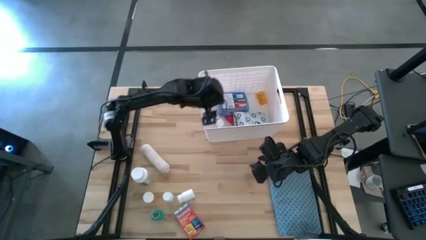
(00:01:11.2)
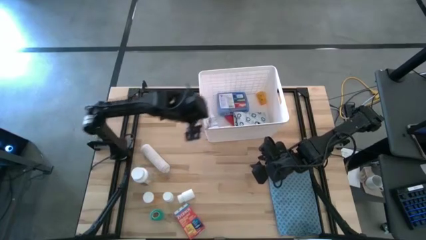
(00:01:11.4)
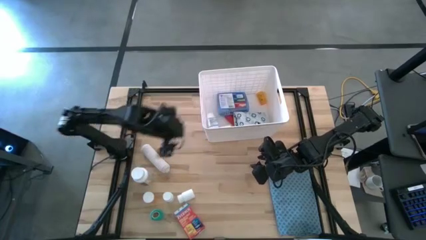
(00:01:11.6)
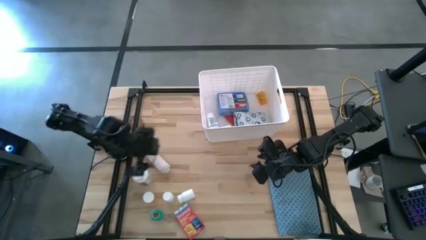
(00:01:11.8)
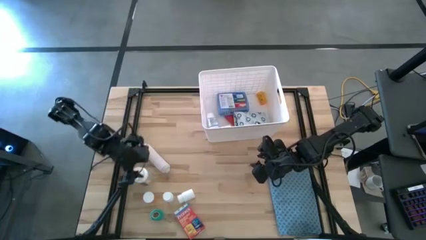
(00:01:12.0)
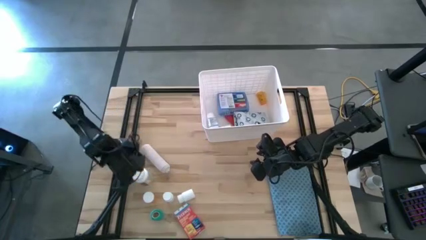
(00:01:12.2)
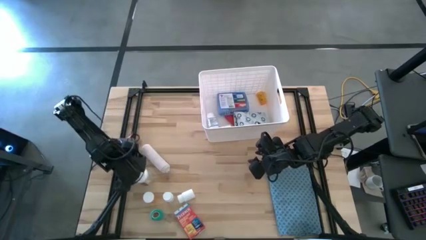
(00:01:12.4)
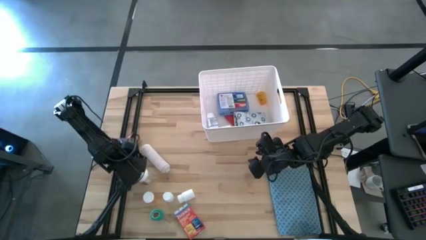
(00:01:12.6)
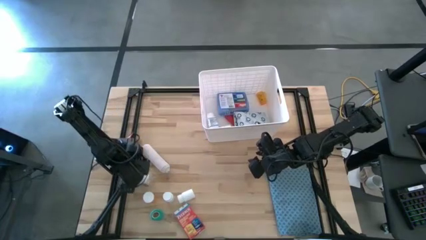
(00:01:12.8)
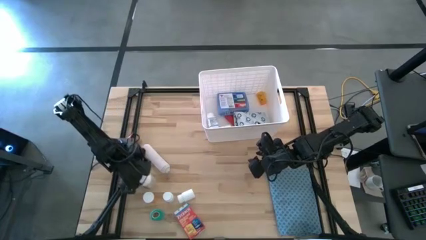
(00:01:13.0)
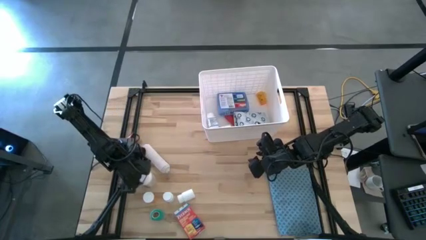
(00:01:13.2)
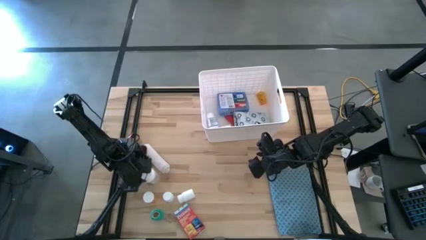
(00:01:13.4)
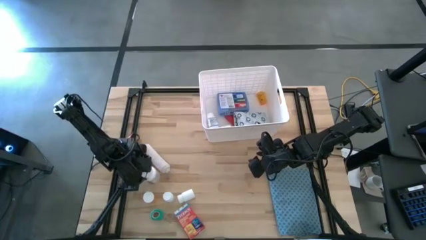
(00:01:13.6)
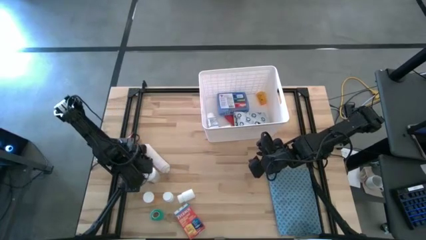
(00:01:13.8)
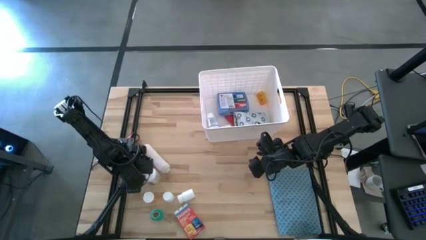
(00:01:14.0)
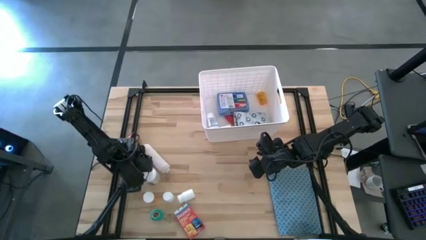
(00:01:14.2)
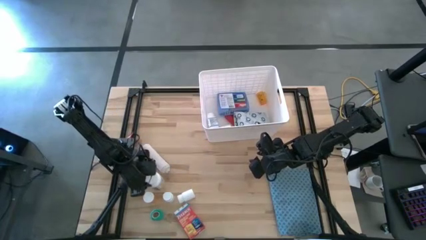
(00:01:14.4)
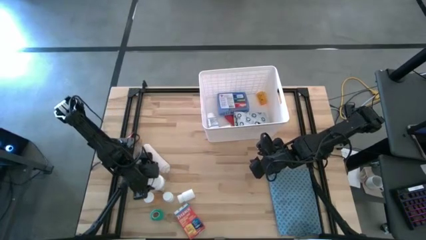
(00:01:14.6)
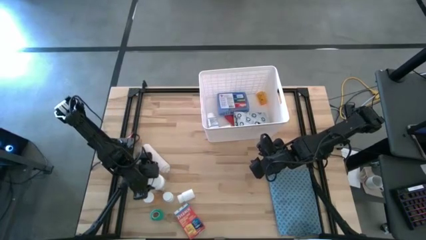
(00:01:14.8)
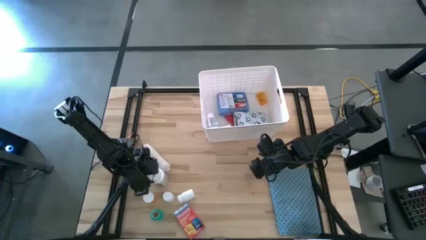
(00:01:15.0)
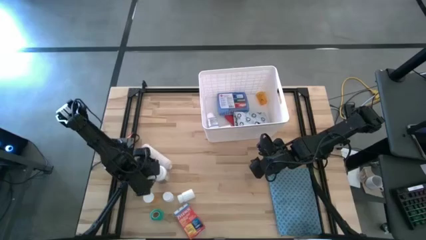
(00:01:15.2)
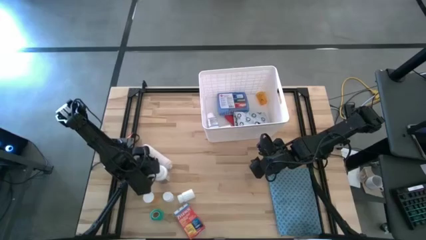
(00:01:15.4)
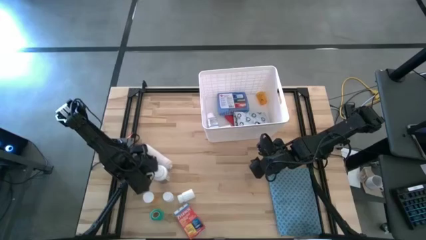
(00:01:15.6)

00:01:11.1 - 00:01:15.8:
Task: Pick & place medical supplies in basket/bin
Put the purple and white medicine bottle into the white bin

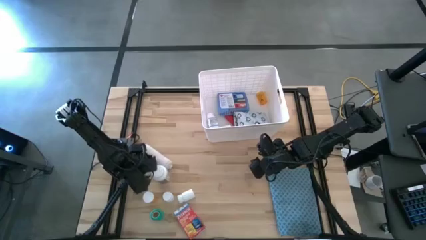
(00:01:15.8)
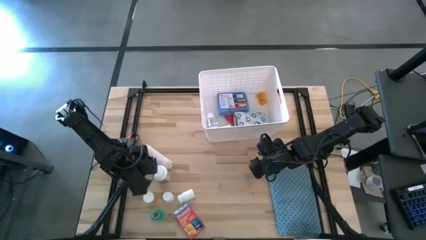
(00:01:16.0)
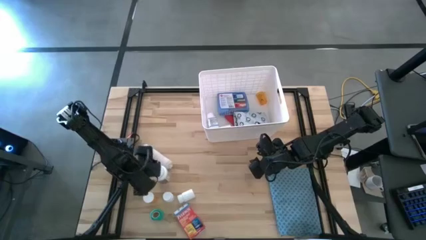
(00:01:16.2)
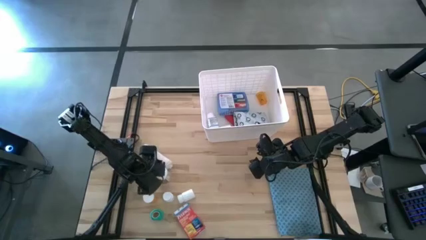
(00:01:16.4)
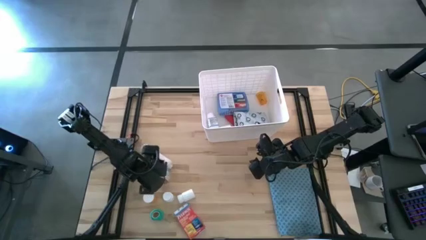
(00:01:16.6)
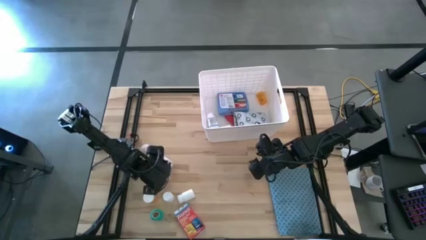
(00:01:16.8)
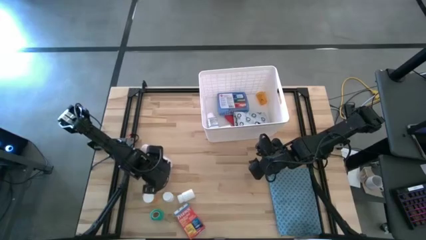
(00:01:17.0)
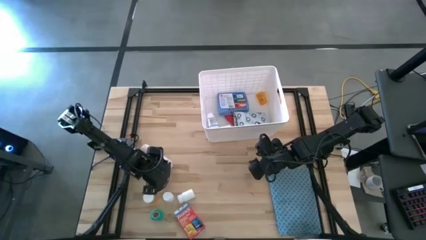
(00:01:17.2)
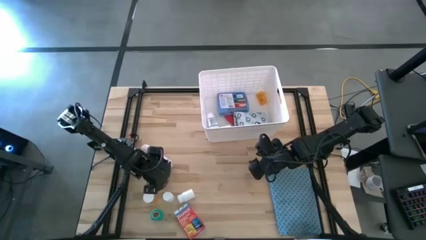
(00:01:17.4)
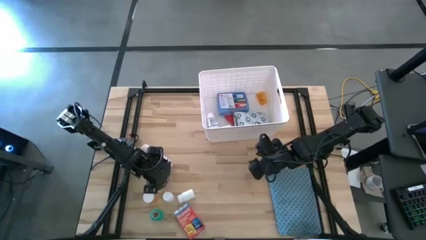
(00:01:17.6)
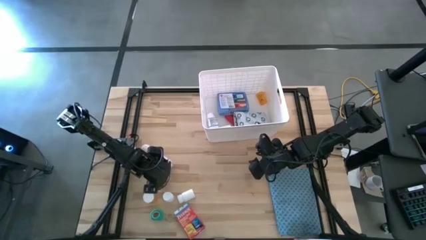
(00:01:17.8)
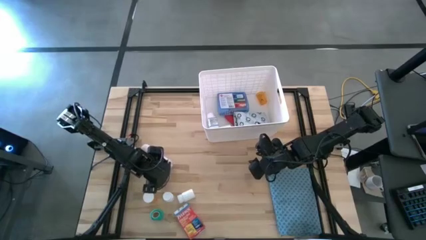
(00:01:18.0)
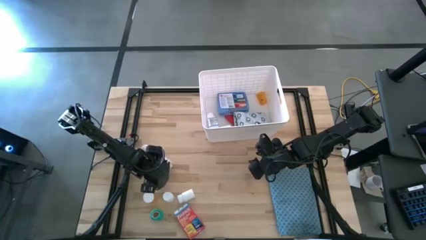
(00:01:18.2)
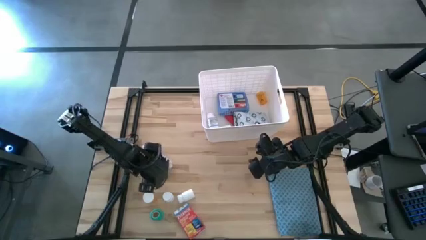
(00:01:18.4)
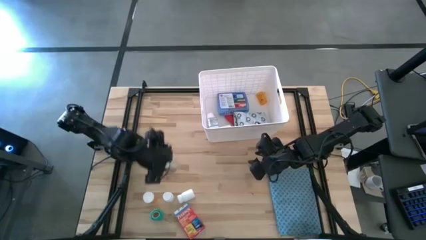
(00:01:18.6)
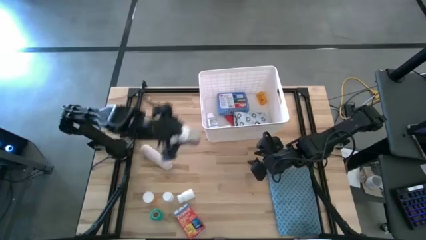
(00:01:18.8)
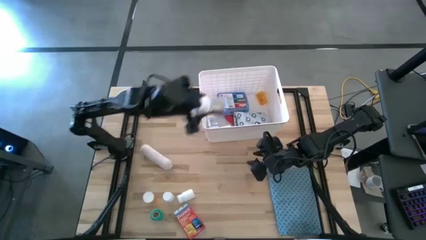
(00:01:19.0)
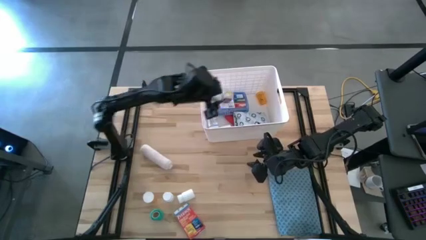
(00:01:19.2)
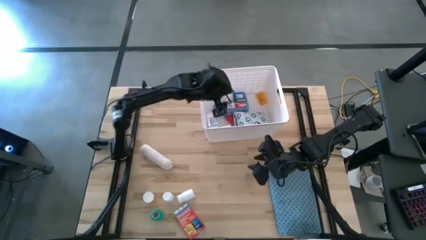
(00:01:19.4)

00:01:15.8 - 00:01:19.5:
Put the purple and white medicine bottle into the white bin

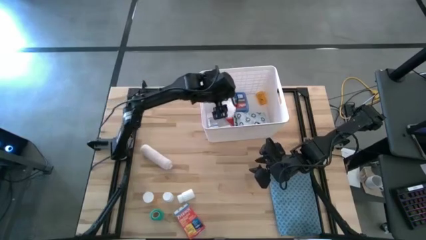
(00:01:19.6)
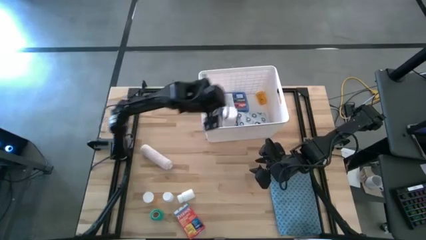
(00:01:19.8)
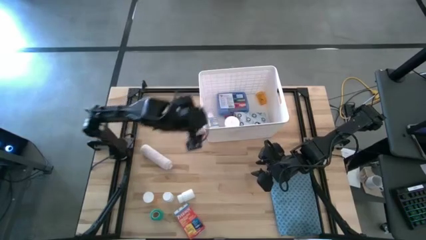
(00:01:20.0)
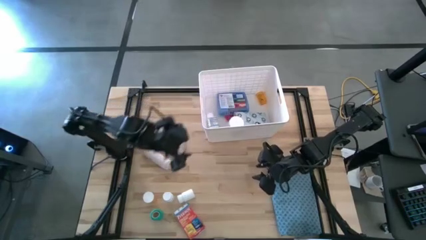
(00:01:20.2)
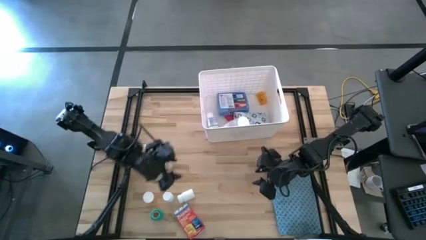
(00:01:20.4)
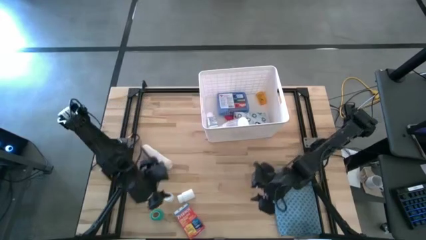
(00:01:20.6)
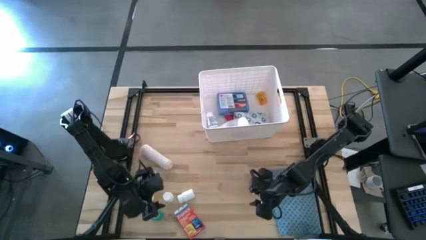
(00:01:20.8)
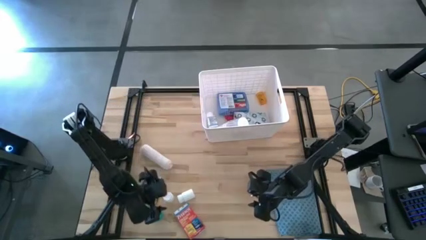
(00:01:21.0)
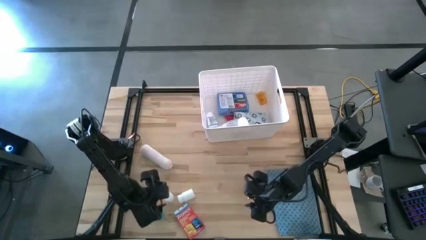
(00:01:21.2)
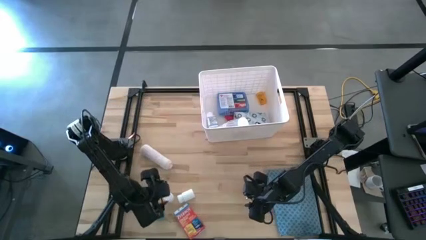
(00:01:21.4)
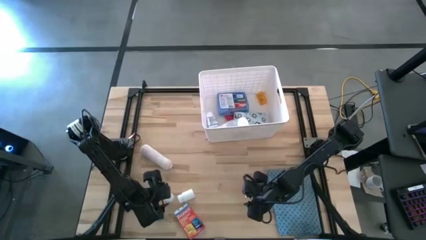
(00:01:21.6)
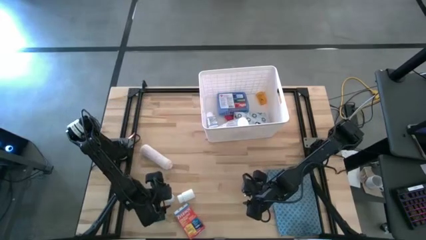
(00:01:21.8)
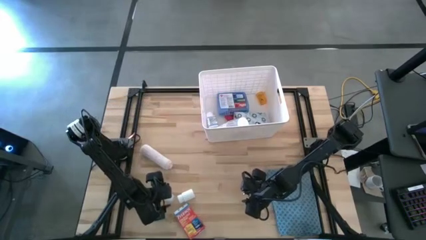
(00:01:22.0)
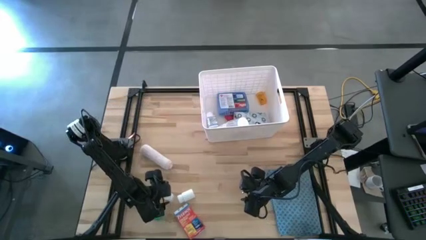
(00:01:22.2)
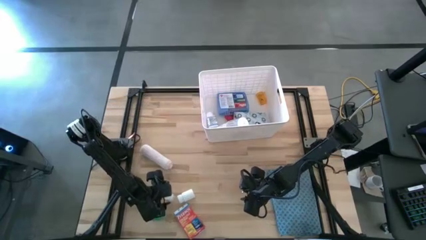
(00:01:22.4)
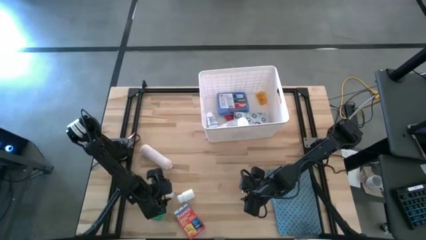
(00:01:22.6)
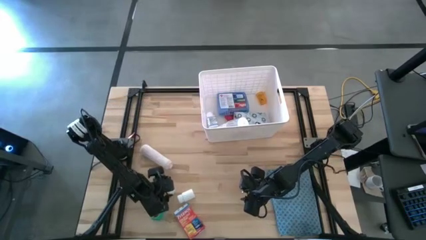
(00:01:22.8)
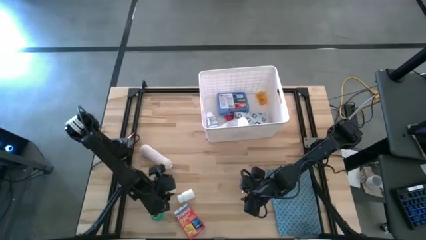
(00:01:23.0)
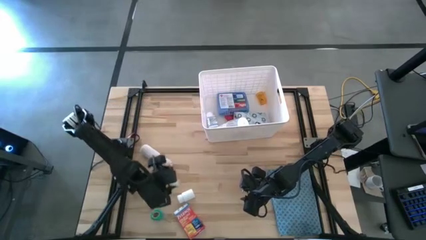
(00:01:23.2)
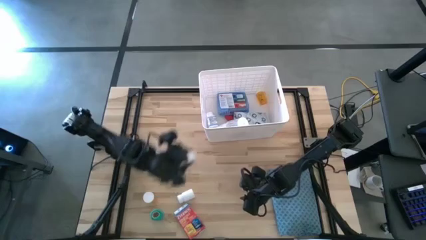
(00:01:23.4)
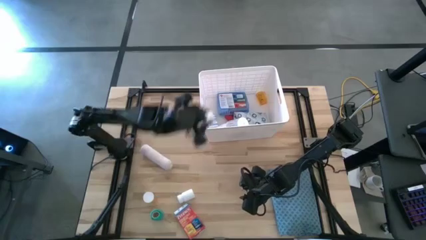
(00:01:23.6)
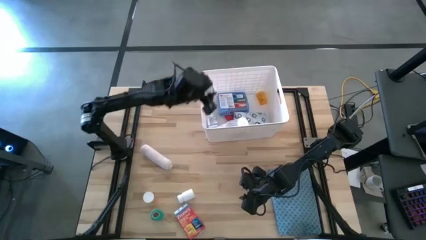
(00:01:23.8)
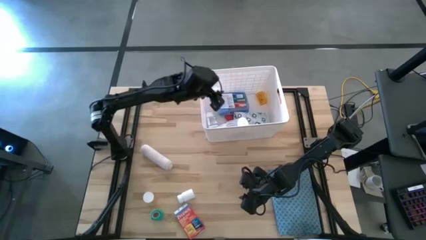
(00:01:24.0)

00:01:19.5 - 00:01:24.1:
Put the left white medicine bottle into the white bin

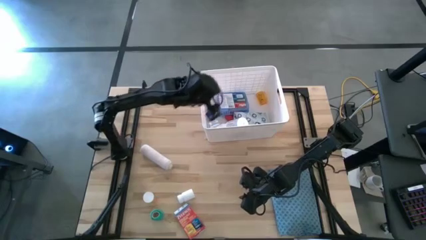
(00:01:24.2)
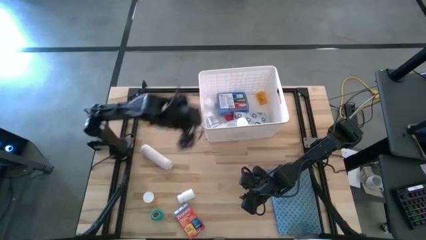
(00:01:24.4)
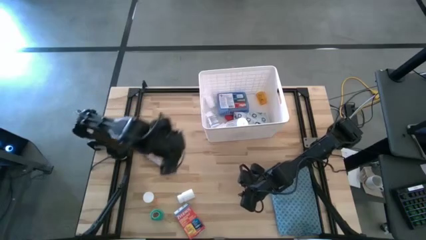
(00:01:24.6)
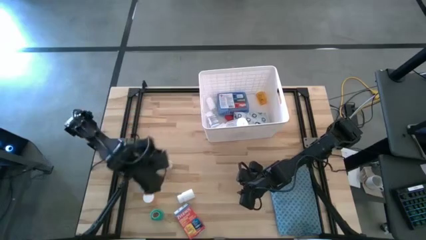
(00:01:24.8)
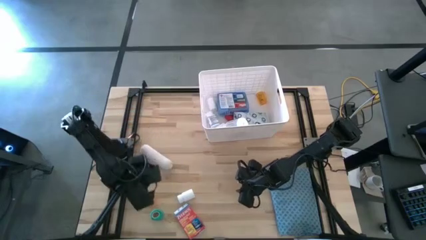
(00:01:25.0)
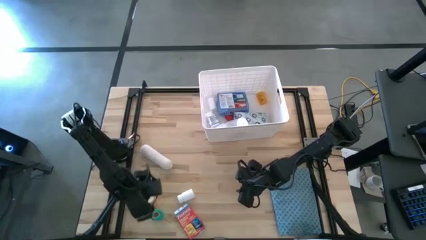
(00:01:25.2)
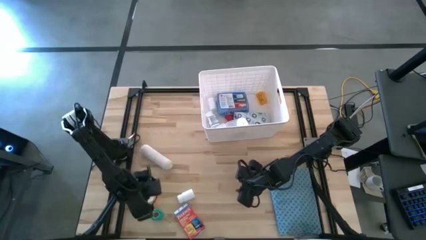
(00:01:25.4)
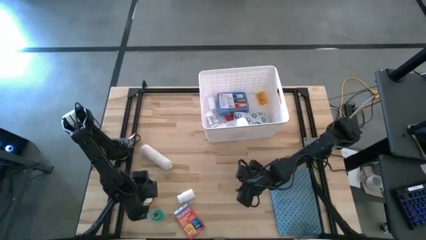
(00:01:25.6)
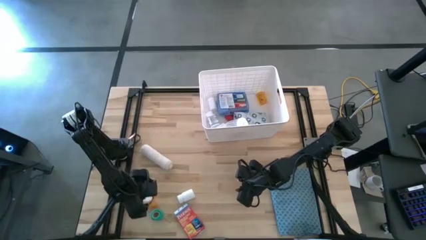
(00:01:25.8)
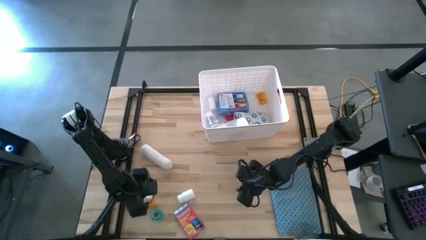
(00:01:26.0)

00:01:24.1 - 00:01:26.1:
Put the orange medicine bottle into the white bin

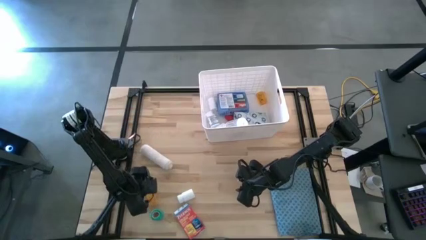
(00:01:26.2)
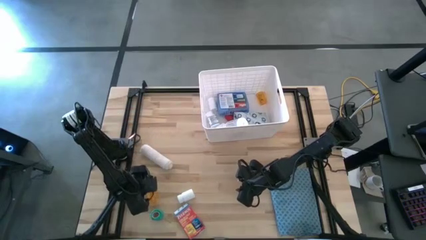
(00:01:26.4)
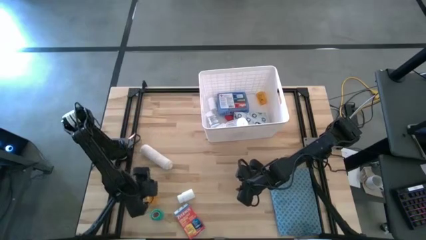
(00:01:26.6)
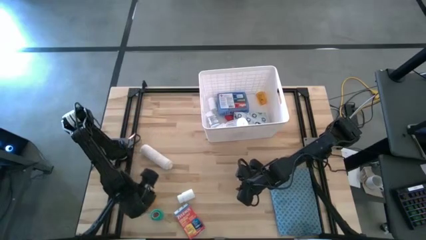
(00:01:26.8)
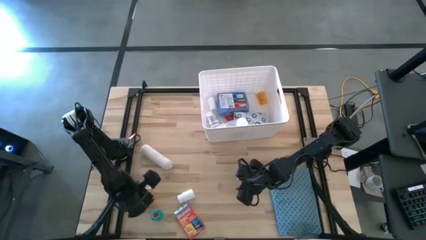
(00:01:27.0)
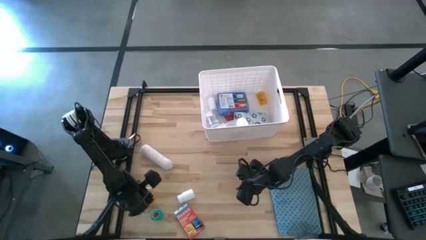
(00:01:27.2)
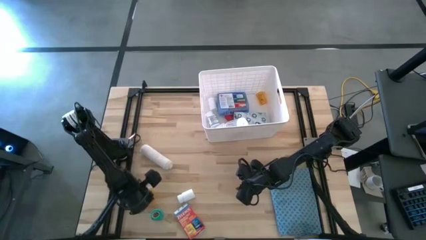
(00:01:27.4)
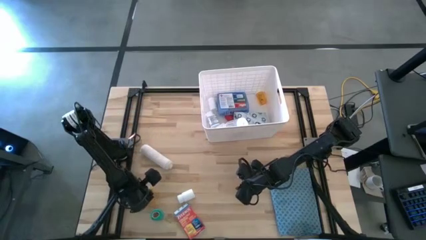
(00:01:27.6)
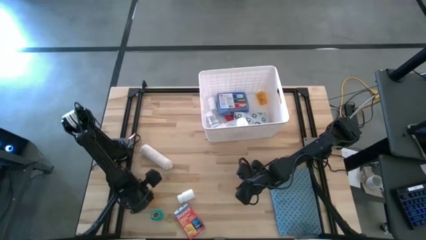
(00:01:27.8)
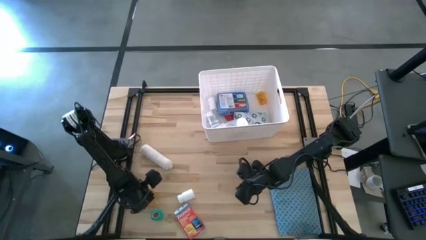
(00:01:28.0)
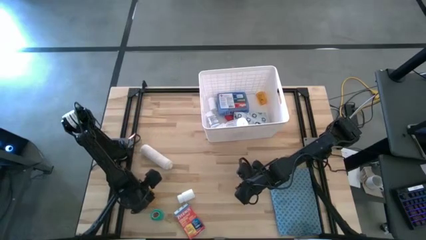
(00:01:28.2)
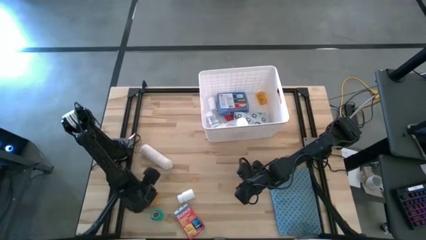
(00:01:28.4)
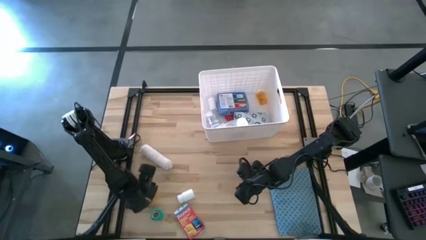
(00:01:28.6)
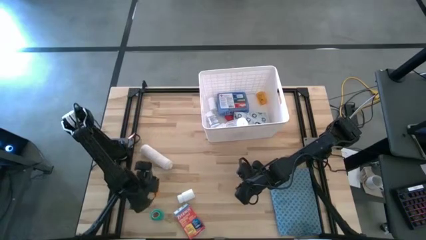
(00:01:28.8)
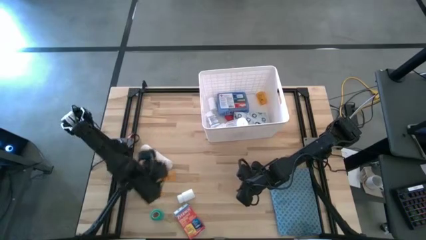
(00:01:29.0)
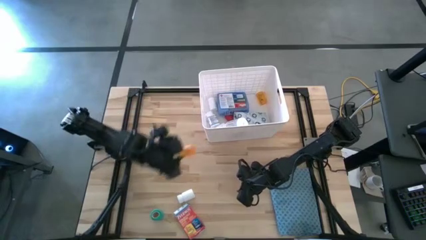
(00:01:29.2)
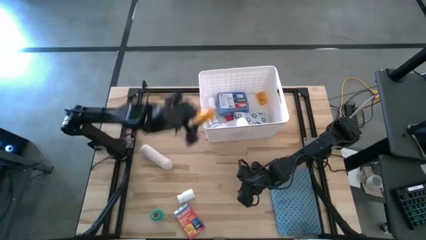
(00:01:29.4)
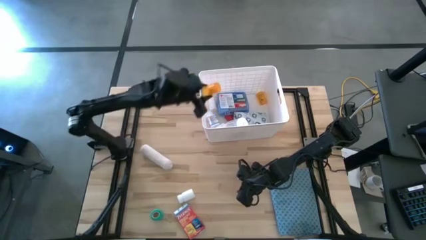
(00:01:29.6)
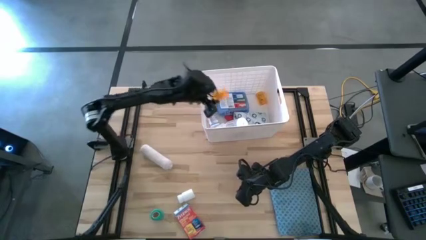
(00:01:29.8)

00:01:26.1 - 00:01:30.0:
Put the orange medicine bottle into the white bin
